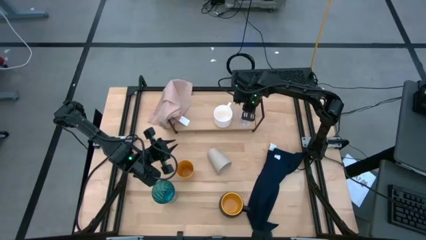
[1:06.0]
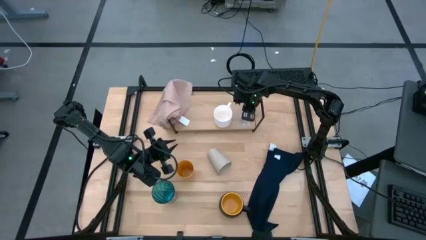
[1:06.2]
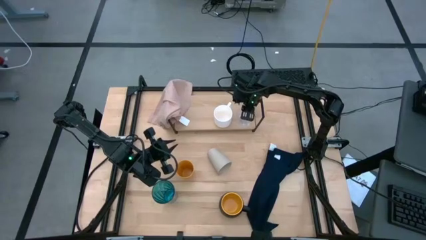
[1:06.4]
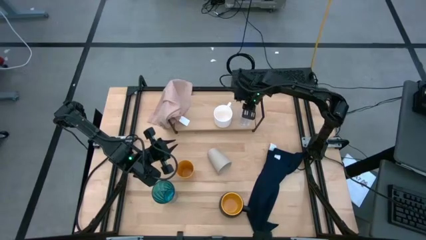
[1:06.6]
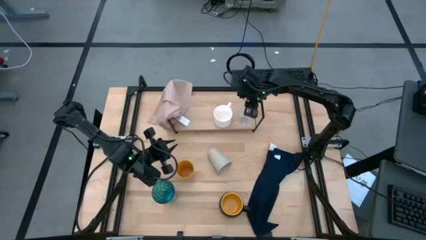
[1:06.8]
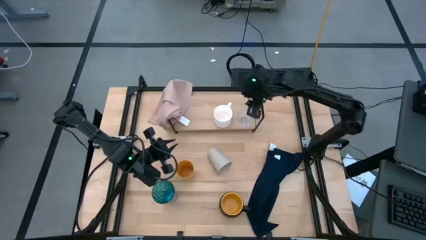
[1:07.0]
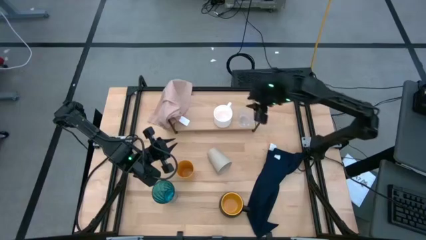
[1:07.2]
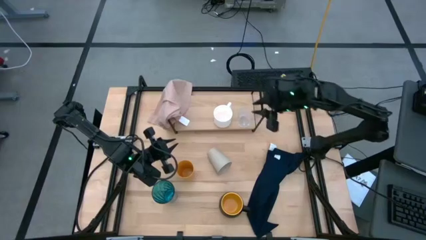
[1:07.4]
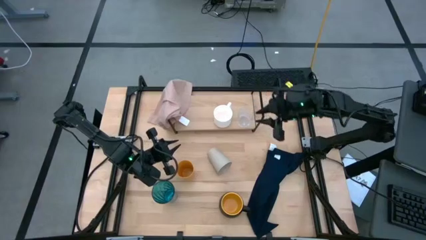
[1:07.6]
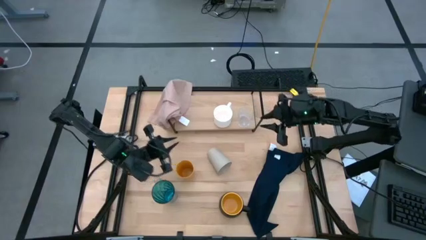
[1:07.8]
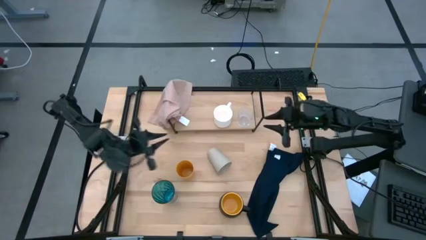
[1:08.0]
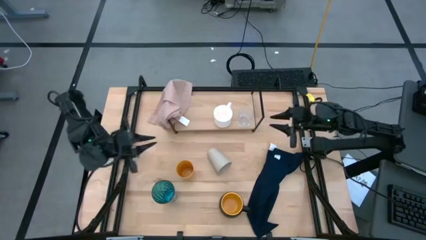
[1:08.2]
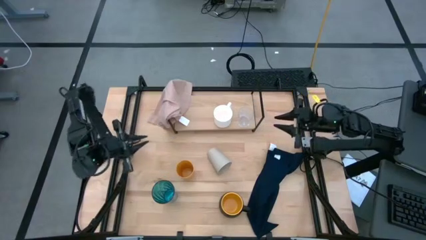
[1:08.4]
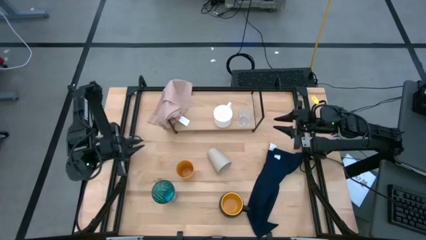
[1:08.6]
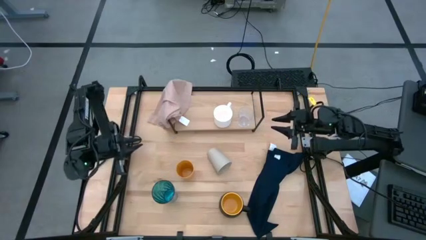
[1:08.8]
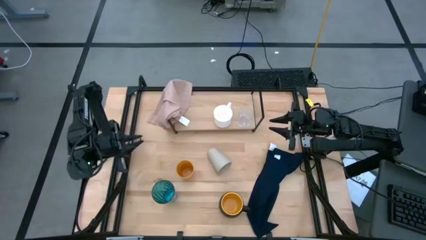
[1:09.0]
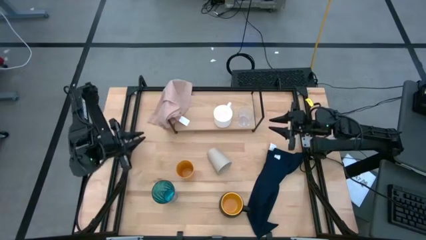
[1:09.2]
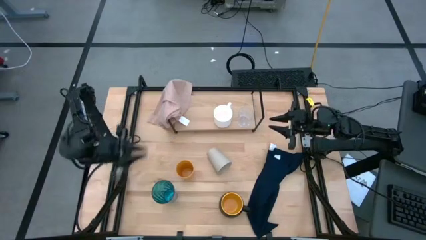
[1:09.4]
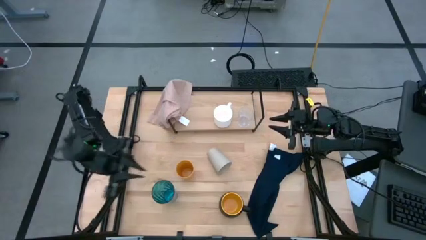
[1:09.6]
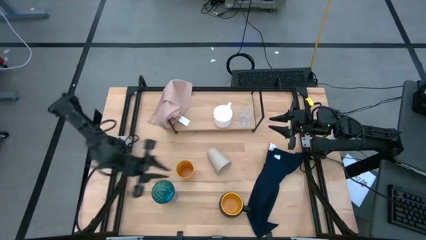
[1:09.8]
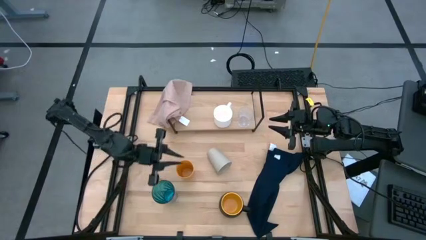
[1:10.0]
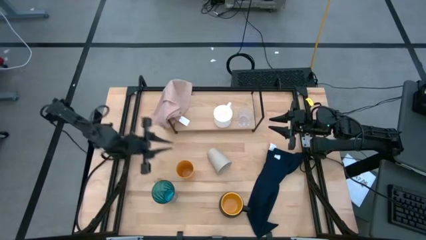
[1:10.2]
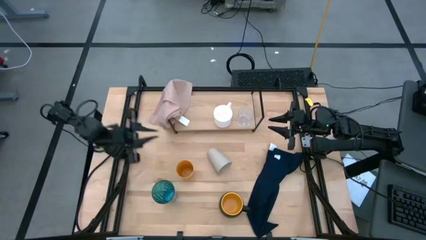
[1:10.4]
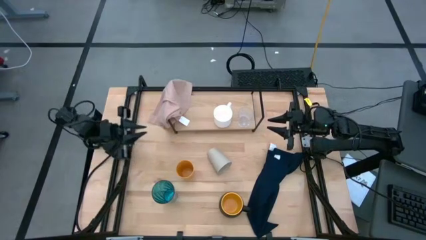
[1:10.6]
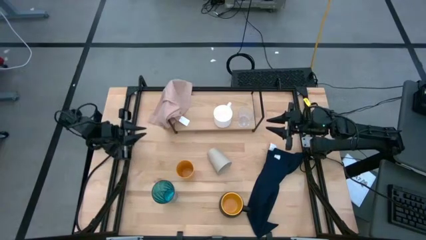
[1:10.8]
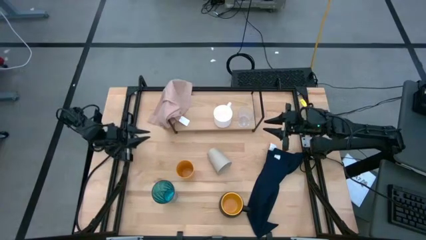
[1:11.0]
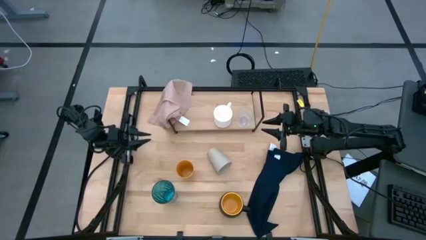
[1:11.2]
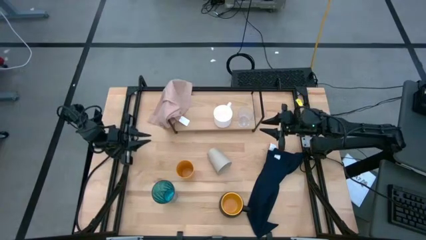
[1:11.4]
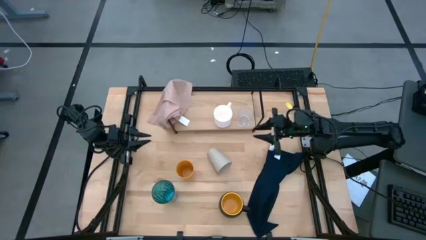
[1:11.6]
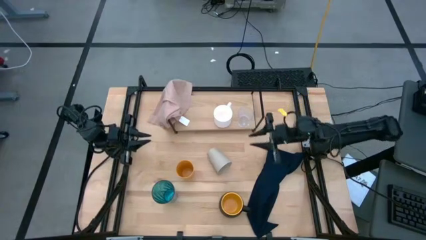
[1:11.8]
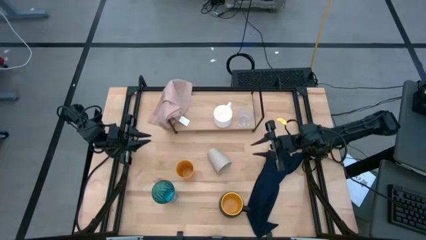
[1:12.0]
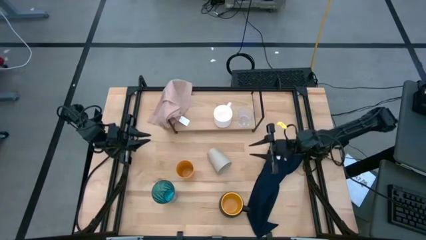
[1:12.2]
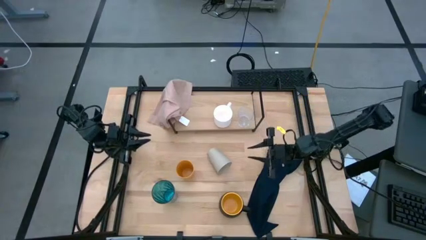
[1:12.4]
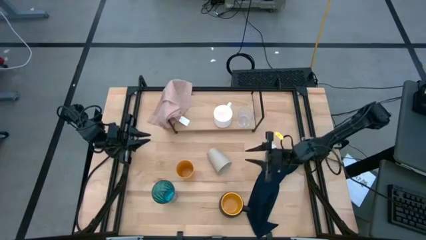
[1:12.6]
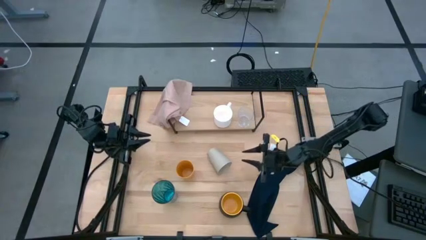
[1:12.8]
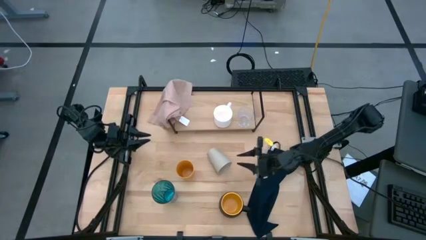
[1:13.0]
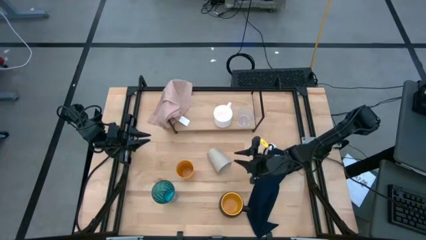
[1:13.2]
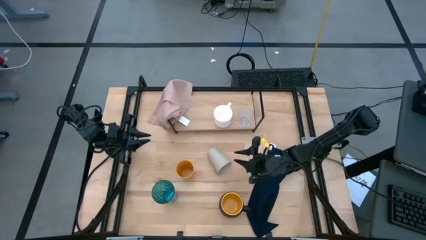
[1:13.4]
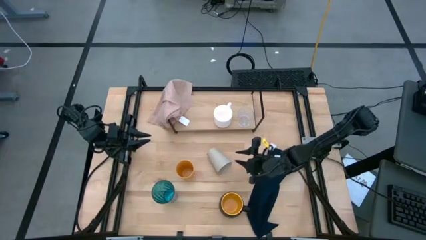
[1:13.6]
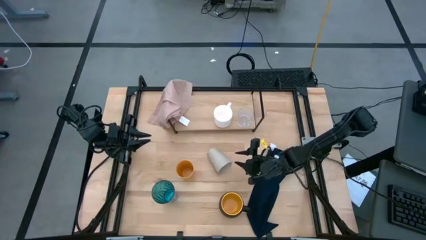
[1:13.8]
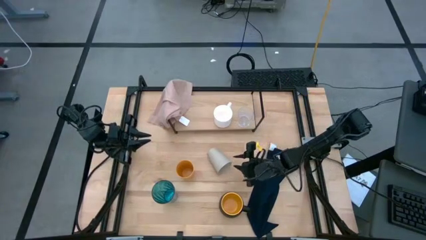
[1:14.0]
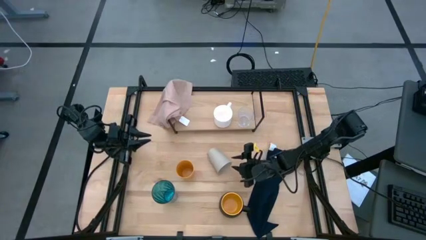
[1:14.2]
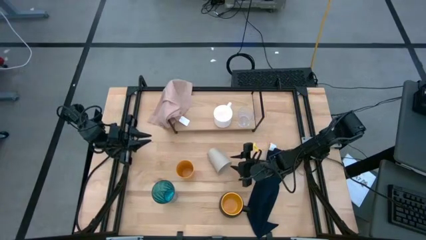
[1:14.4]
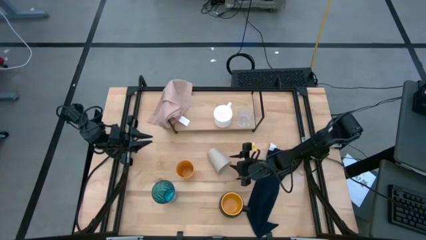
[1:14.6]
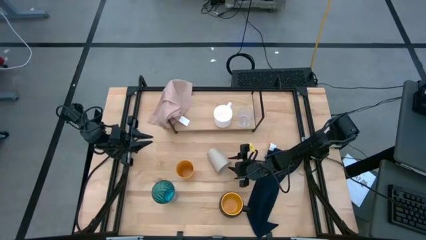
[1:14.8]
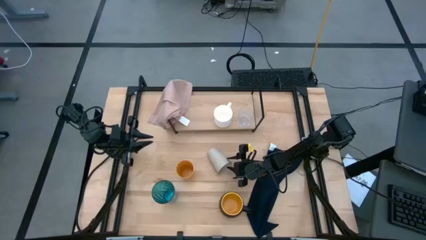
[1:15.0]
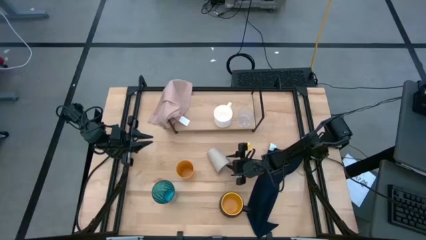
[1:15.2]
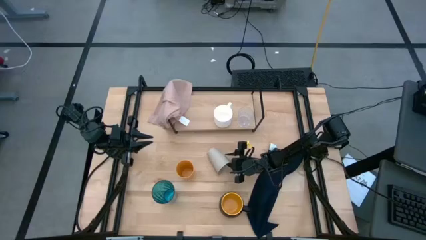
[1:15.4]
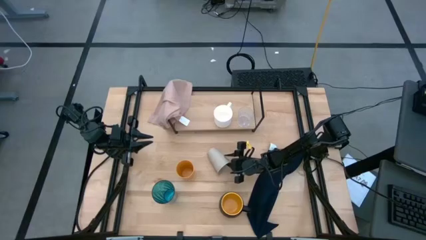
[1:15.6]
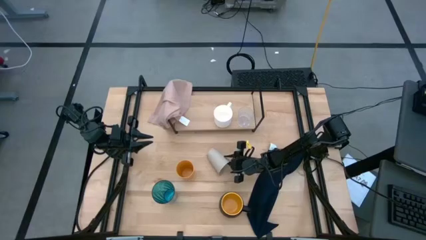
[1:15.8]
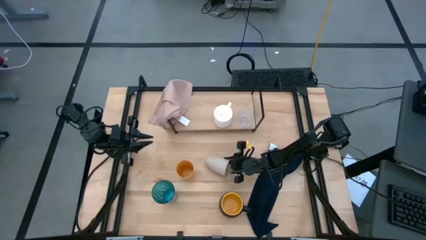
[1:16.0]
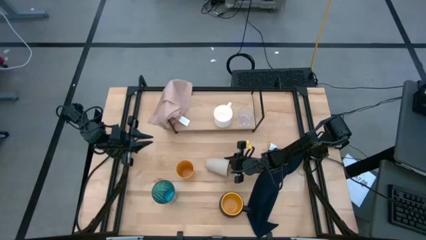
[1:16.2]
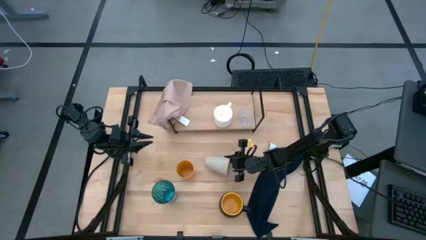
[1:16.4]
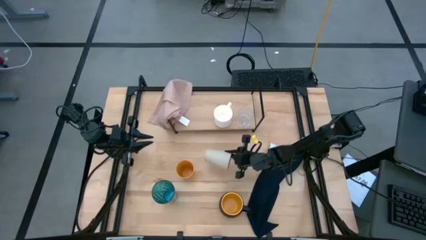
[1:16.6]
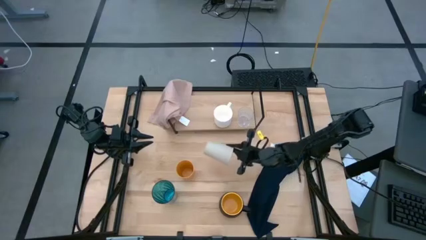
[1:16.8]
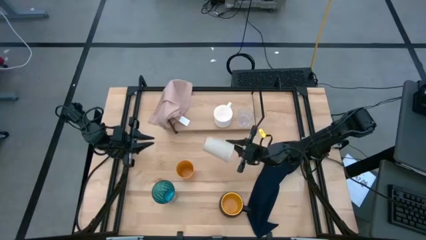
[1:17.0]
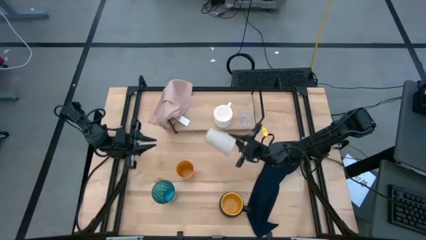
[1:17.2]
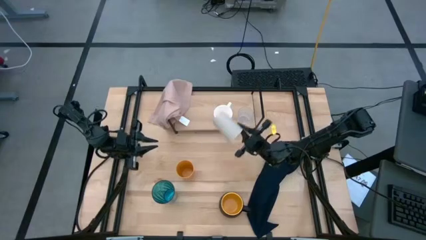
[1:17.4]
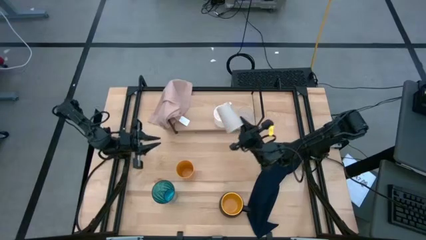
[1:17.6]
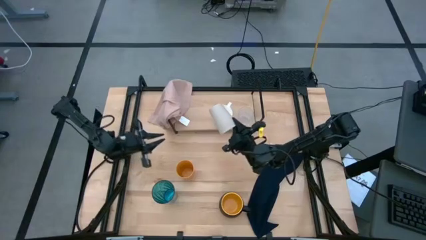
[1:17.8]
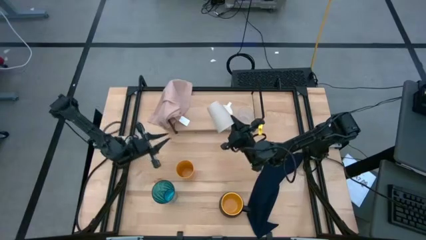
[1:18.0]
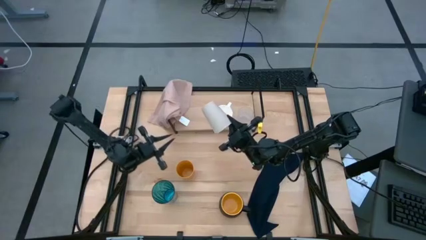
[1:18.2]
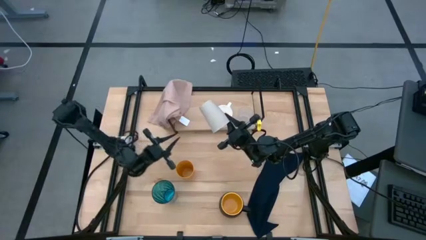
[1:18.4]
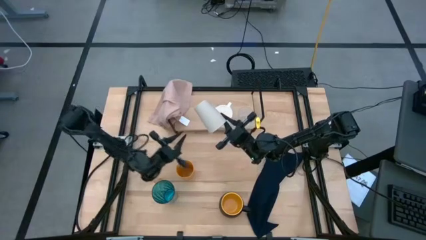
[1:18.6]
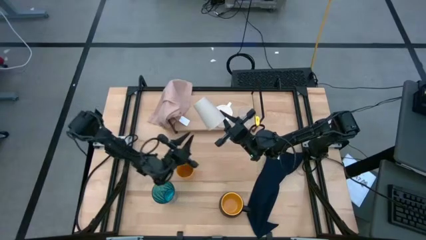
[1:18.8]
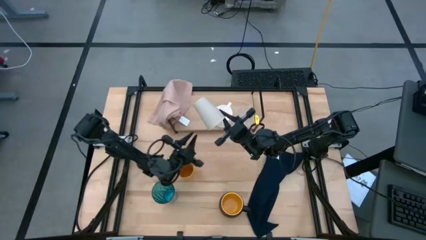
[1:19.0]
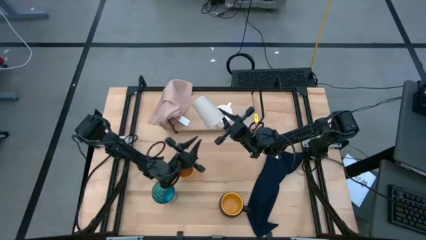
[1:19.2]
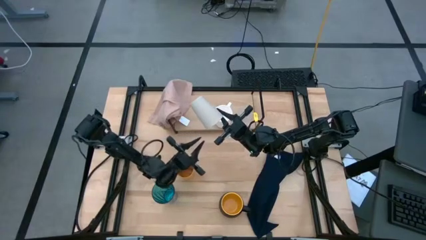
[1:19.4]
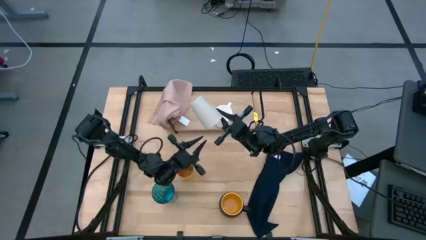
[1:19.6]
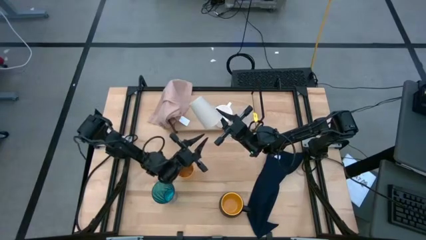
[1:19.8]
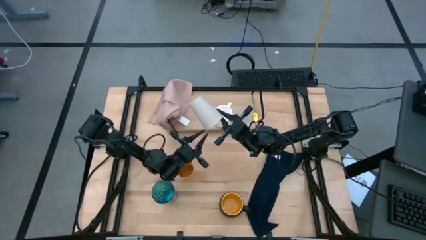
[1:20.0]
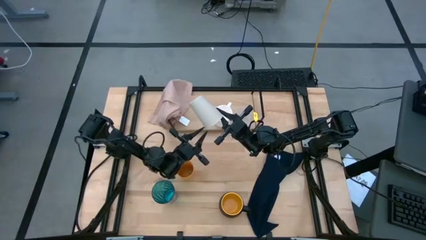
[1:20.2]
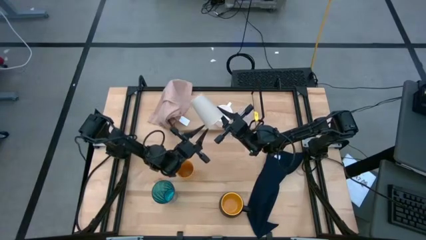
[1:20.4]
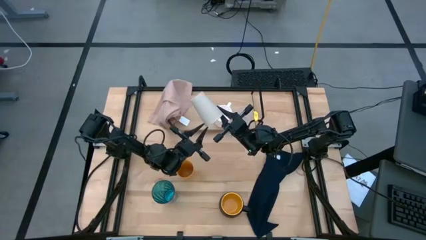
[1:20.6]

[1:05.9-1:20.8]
Task: Stack small to large cups/mugs on shelf
Put the light brown cup on the shelf
